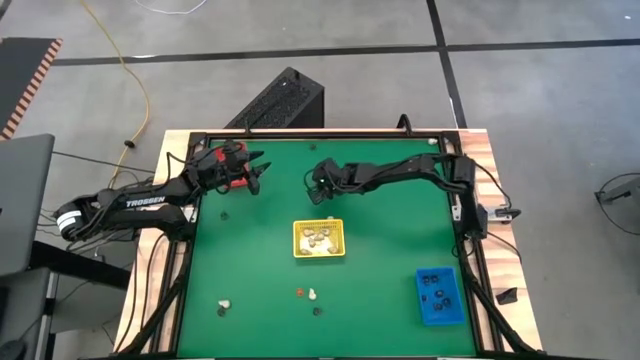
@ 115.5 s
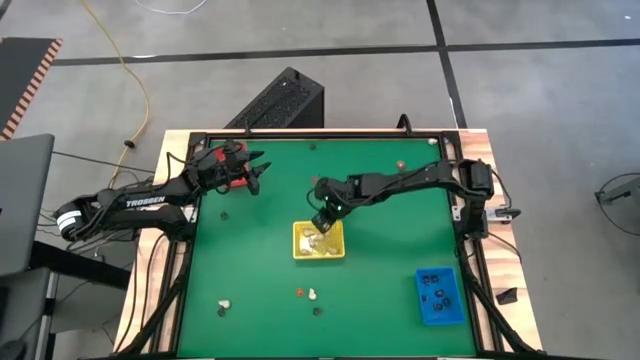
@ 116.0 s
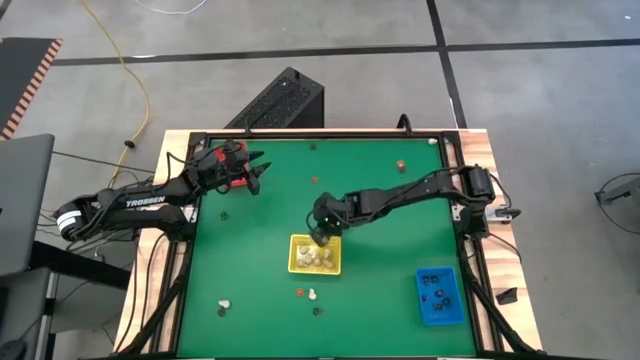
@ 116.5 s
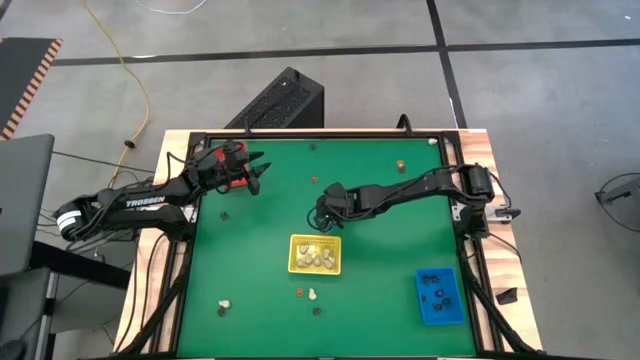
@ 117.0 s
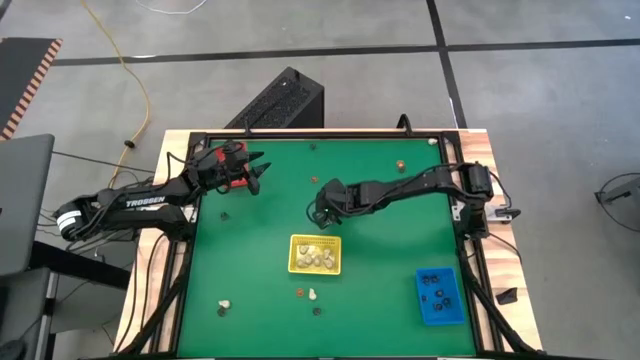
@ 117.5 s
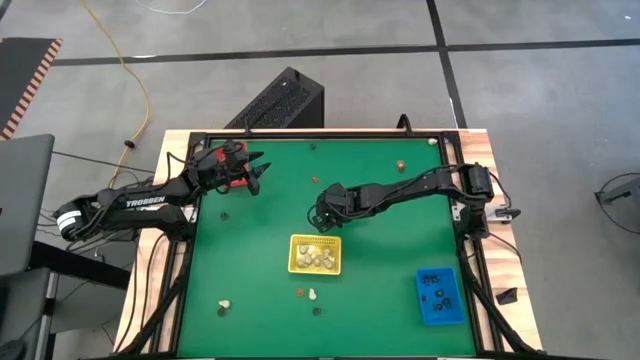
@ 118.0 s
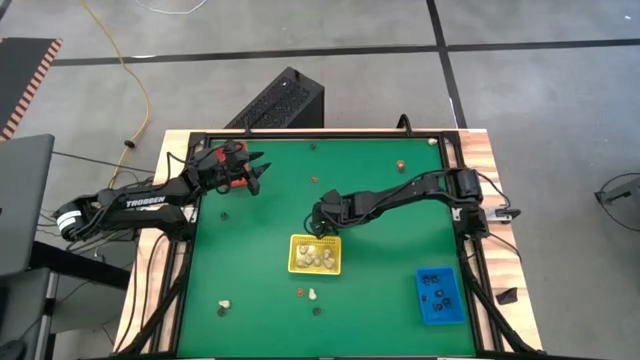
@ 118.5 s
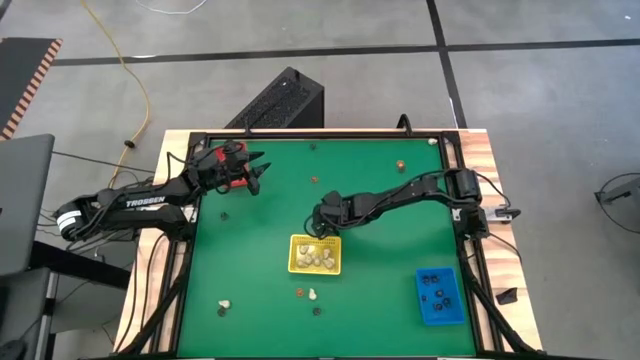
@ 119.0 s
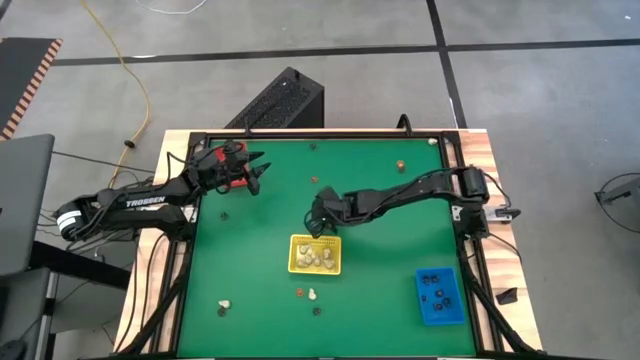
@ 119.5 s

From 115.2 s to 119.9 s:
Task: Sort Halloween decoration
Put the white skull toy into the yellow bin

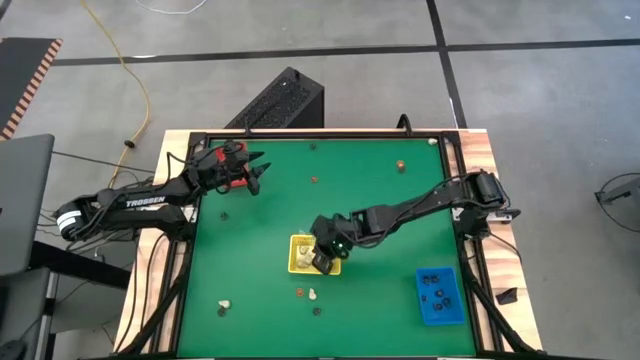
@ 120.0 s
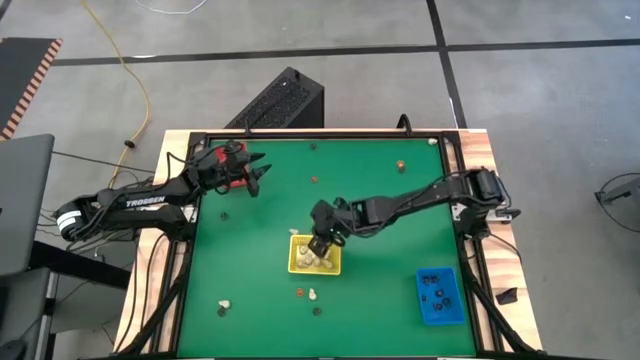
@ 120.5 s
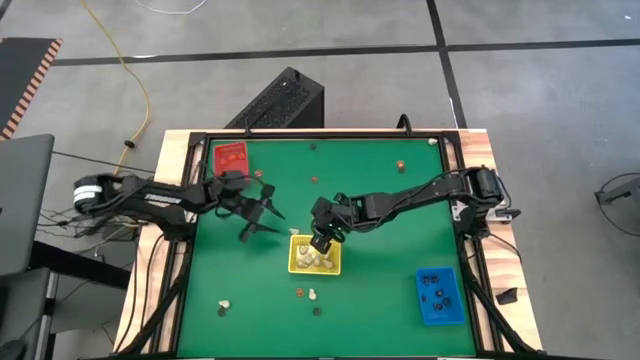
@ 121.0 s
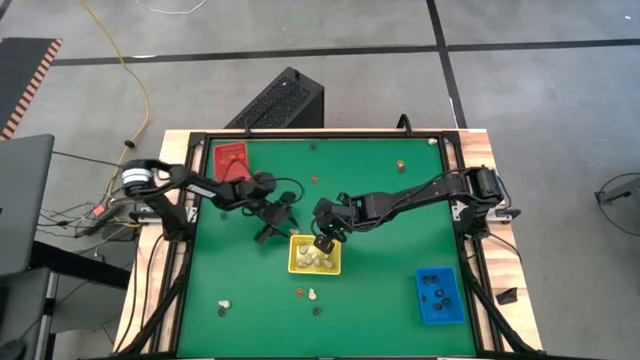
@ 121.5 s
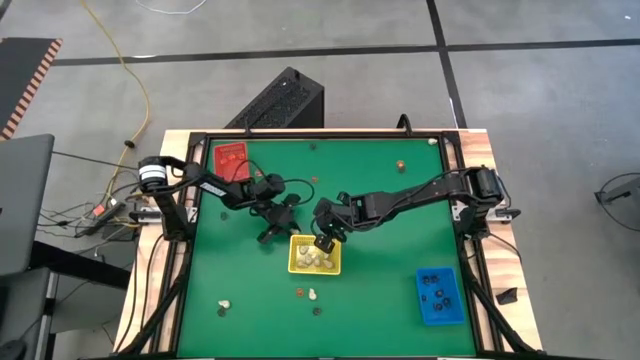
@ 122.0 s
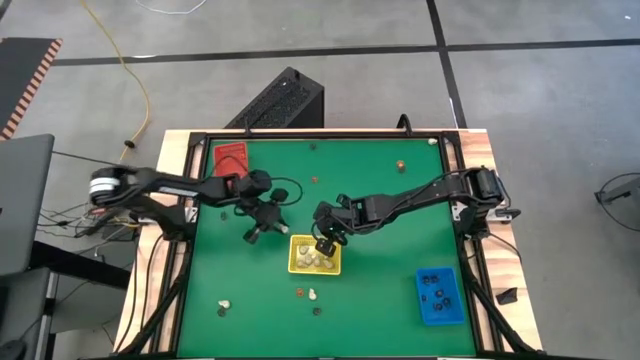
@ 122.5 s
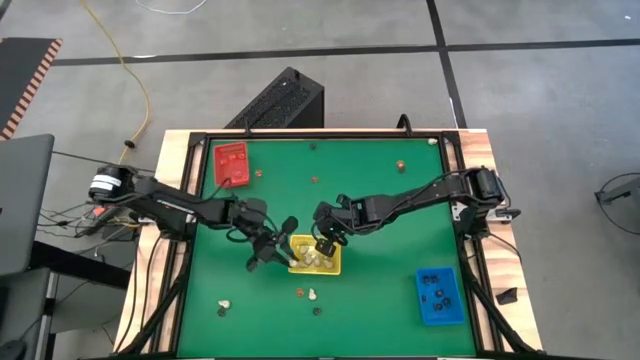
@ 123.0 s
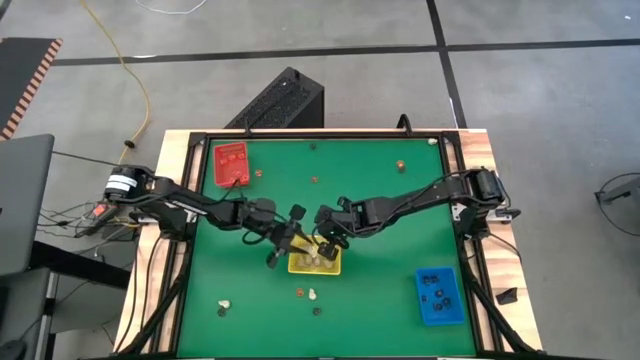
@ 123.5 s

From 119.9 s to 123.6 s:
Put the white skull toy into the yellow bin

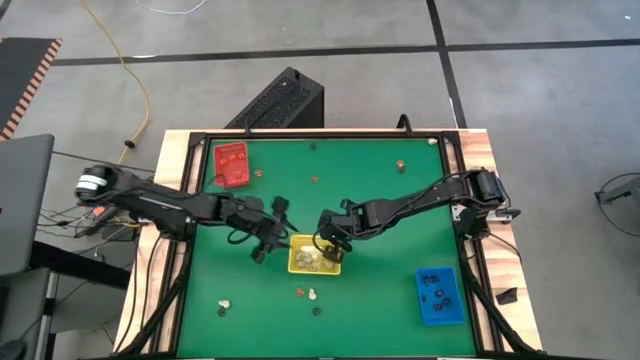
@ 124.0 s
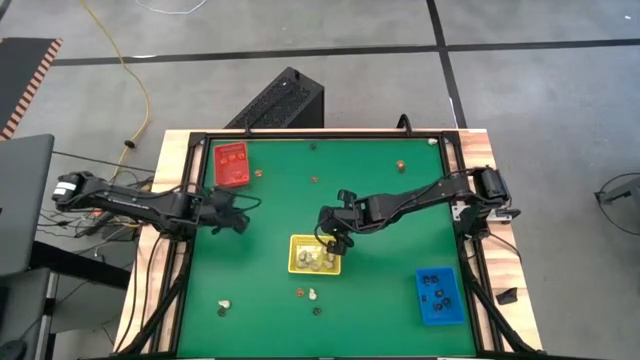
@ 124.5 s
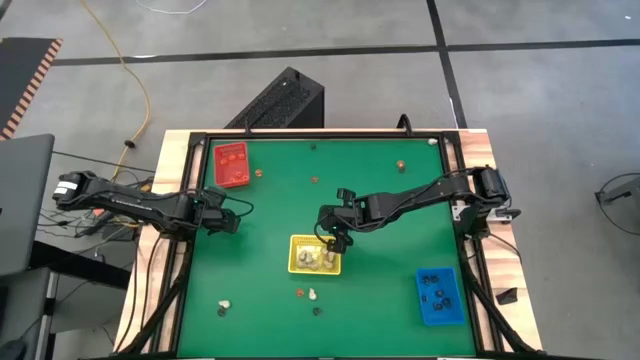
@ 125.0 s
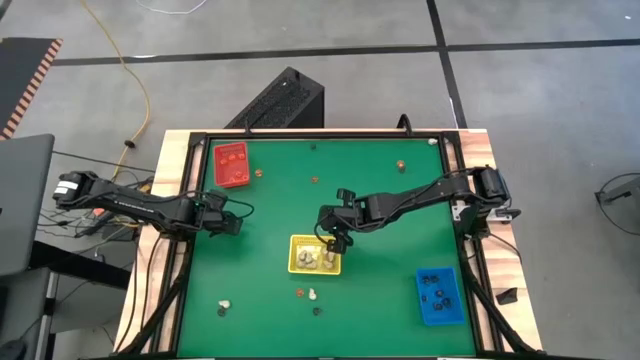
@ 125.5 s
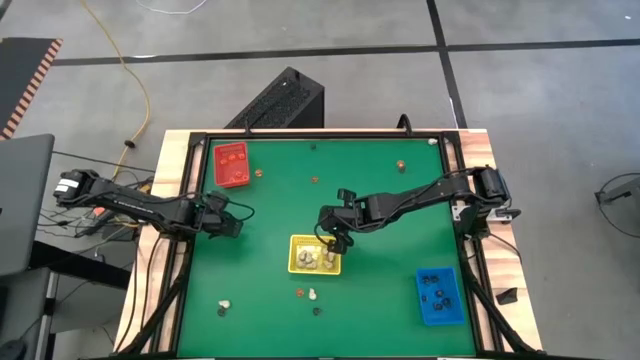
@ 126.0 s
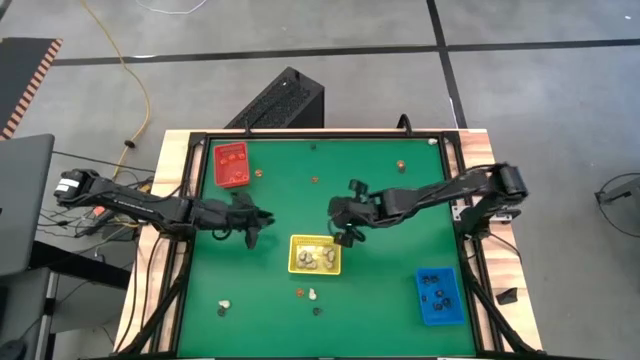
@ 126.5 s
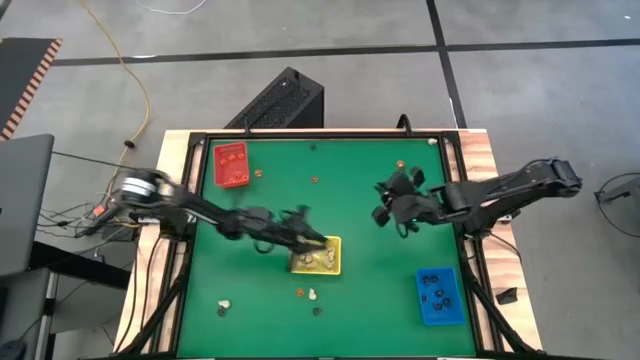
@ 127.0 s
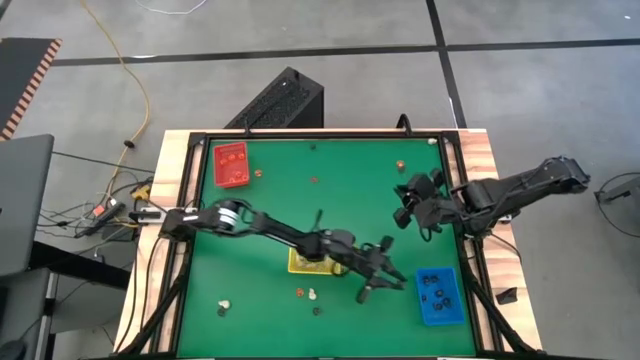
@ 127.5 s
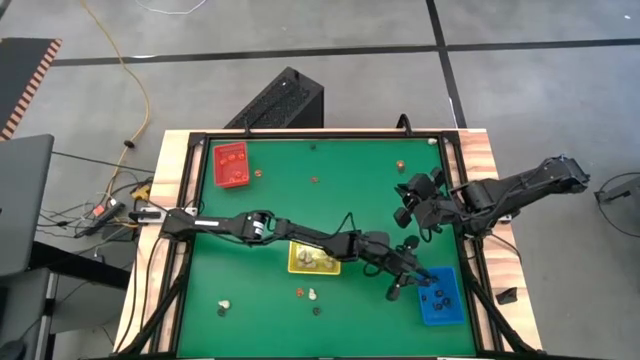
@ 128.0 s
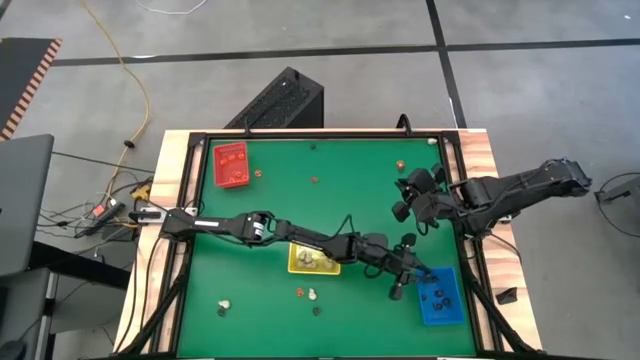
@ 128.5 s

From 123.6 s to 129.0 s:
Put the black skull toy into the blue bin

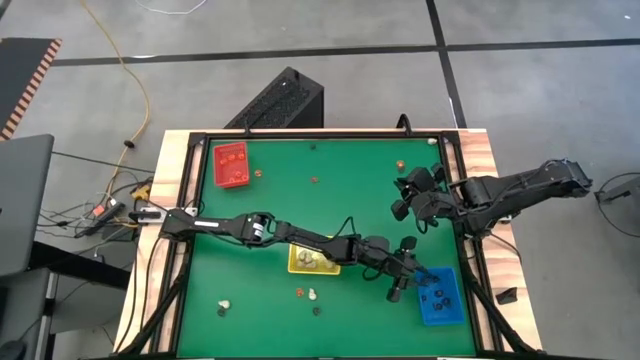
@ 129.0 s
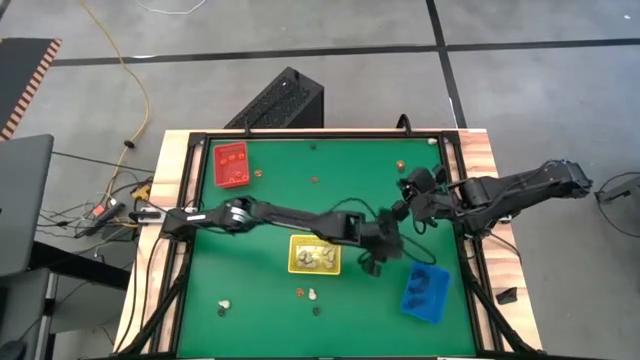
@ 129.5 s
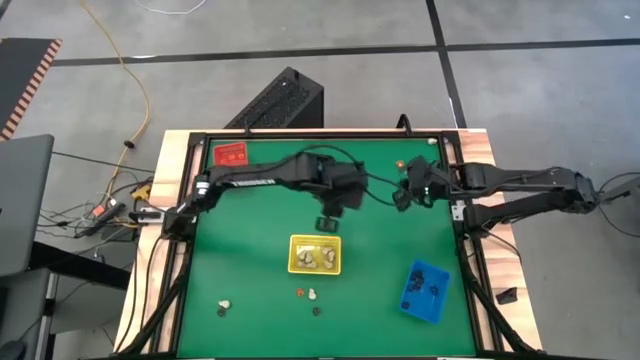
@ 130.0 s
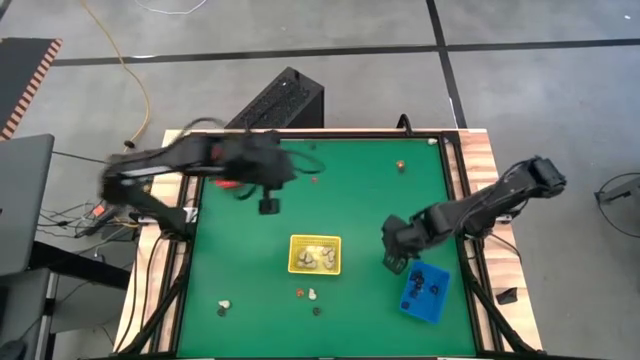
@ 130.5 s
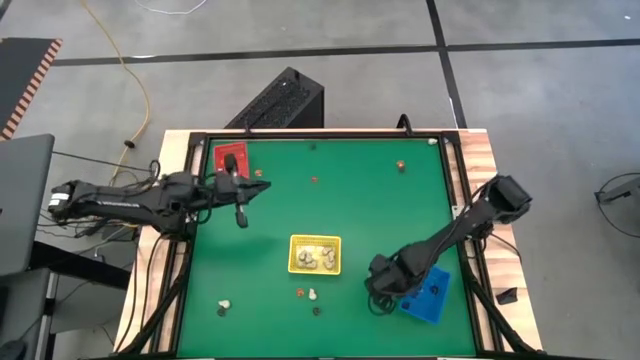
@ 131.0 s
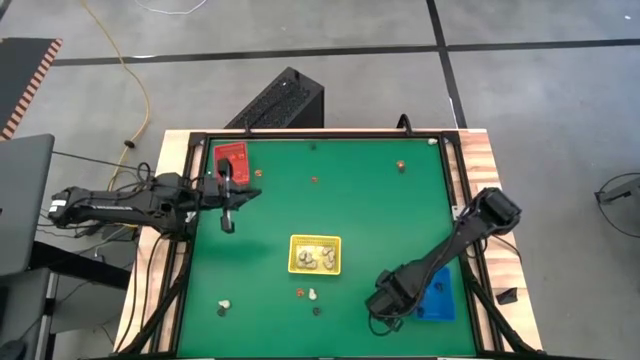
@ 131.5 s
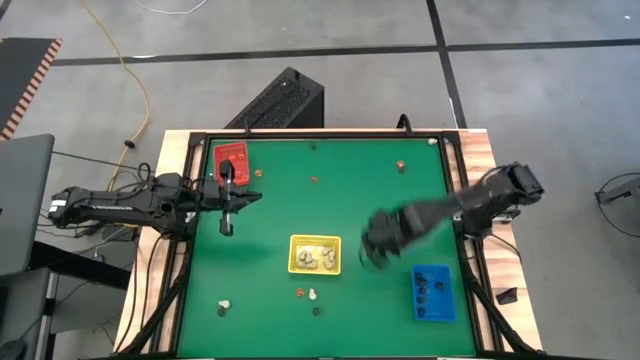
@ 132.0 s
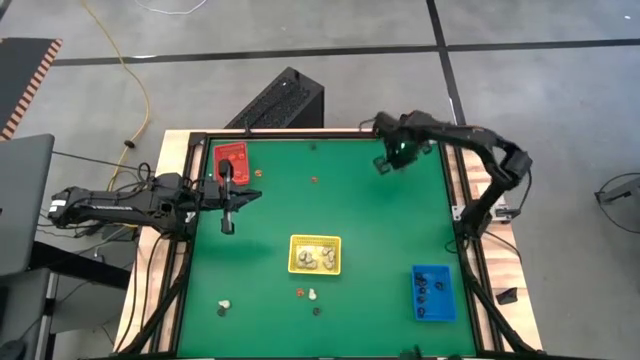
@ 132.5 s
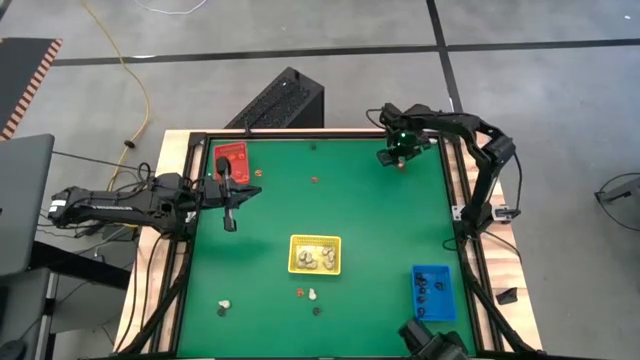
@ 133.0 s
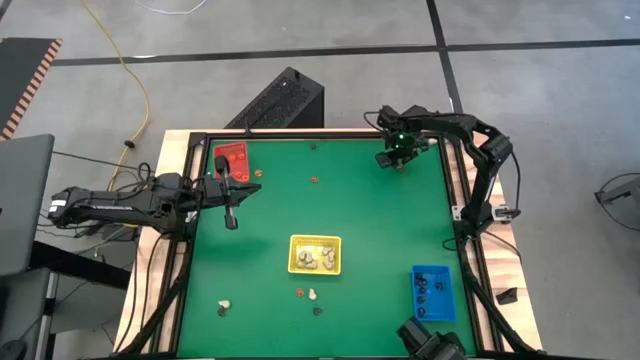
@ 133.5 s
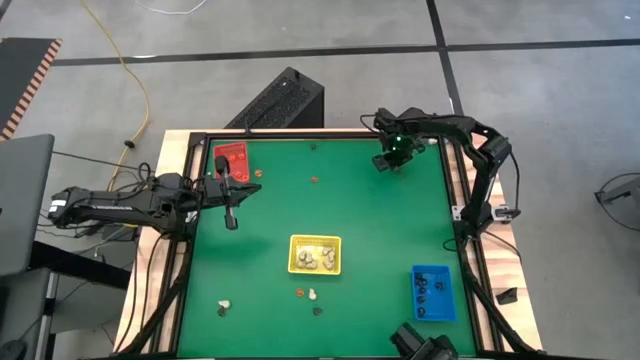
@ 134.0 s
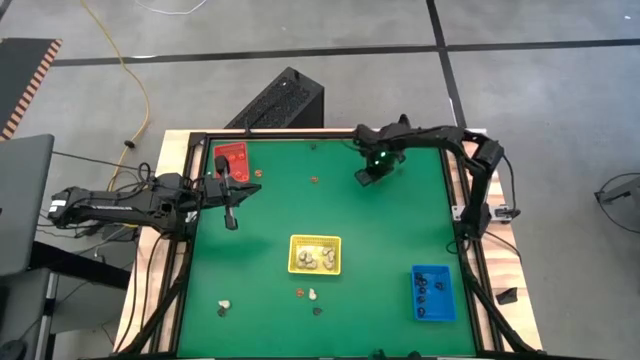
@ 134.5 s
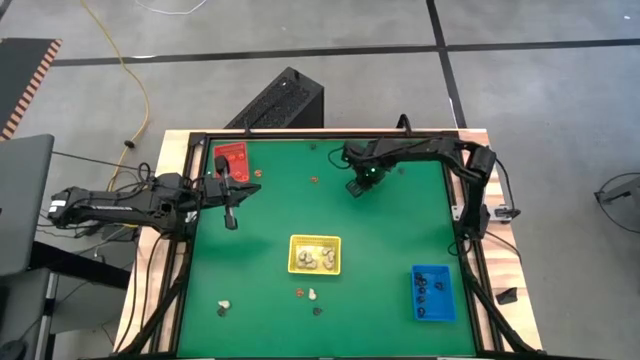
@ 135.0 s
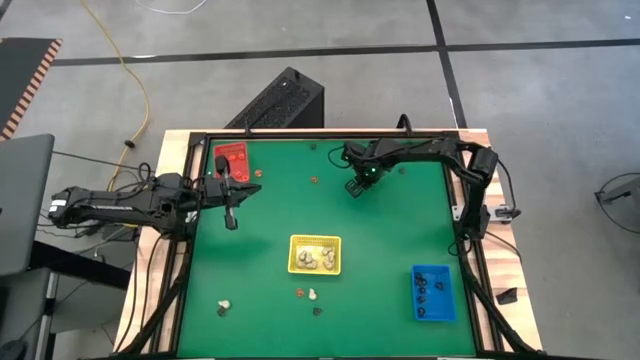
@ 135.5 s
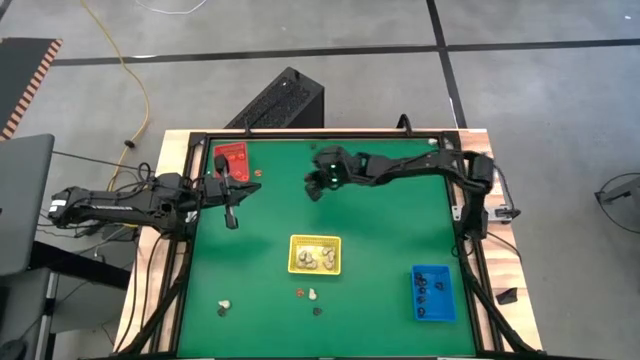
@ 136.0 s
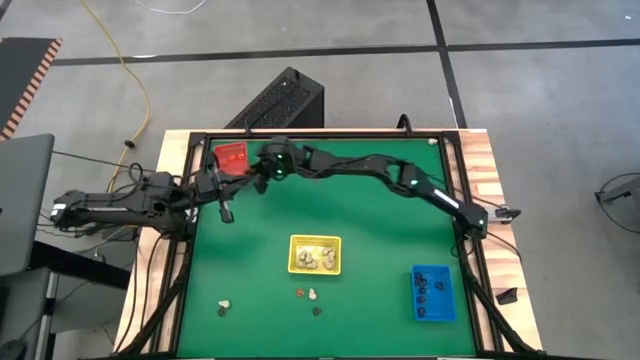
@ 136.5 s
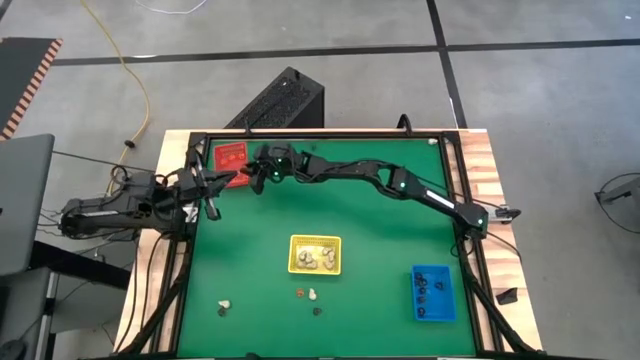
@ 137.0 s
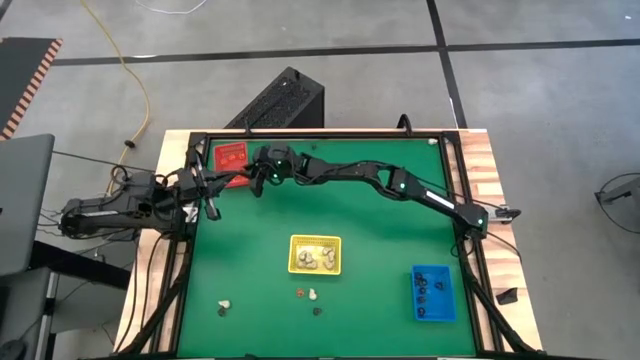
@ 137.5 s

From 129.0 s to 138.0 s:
Put the orange pumpkin toy into the red bin
